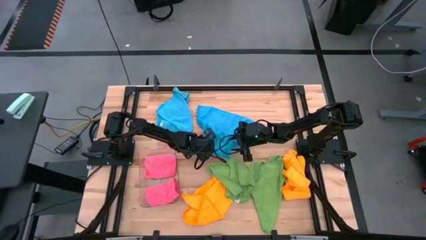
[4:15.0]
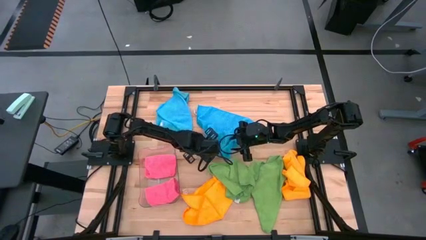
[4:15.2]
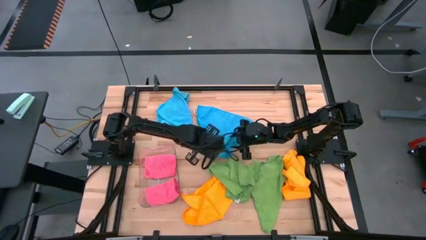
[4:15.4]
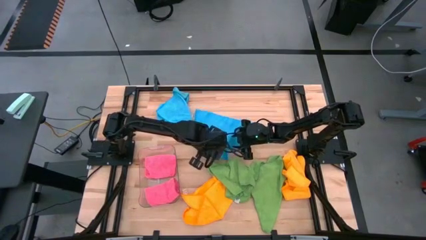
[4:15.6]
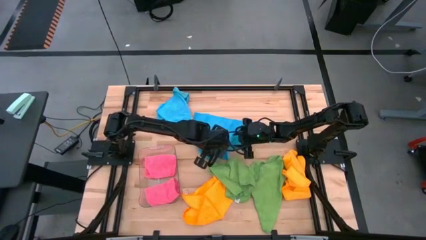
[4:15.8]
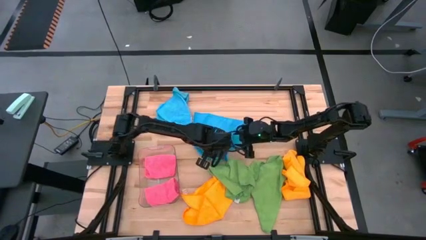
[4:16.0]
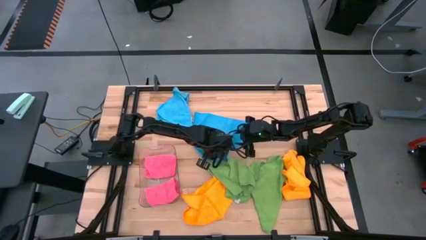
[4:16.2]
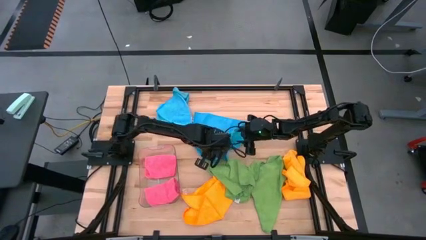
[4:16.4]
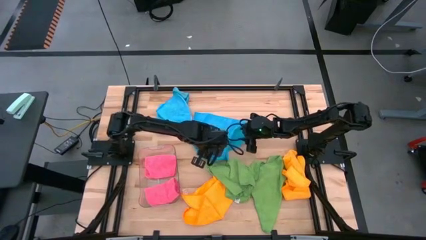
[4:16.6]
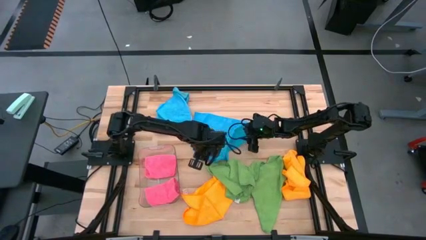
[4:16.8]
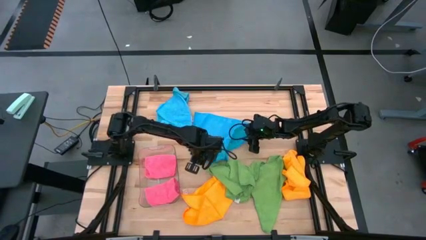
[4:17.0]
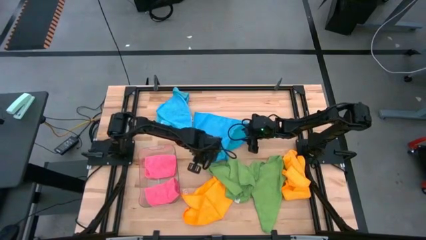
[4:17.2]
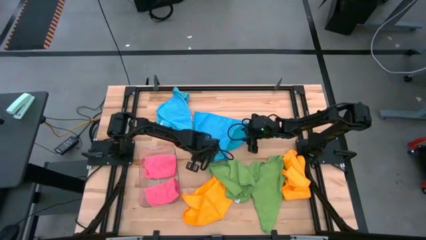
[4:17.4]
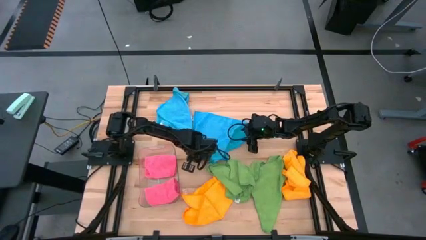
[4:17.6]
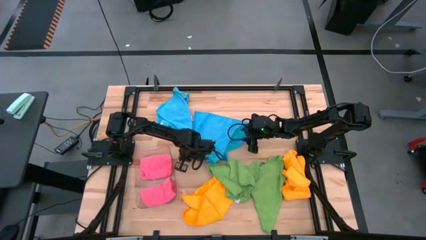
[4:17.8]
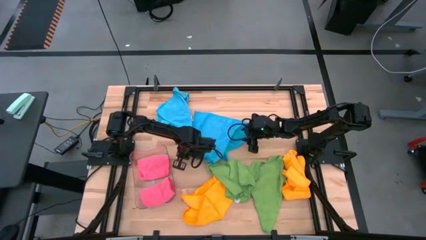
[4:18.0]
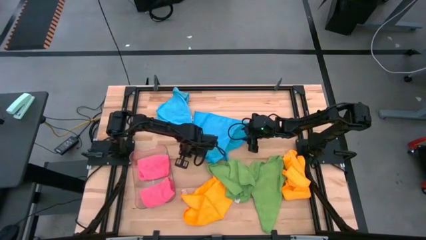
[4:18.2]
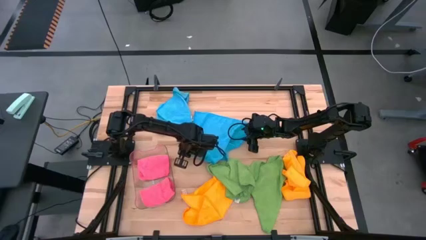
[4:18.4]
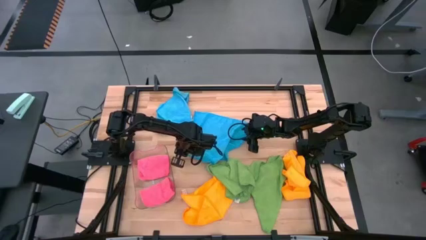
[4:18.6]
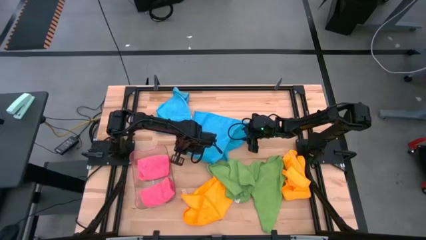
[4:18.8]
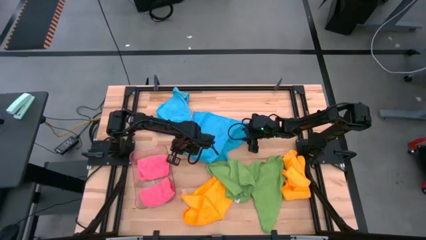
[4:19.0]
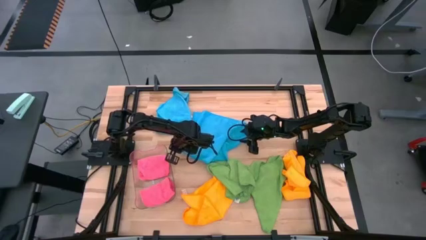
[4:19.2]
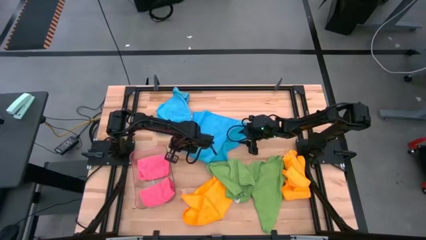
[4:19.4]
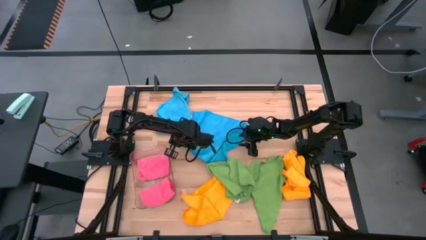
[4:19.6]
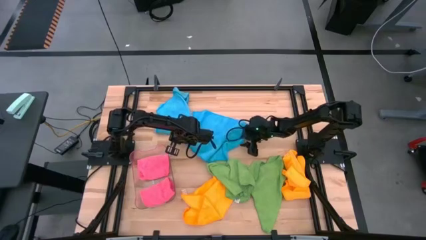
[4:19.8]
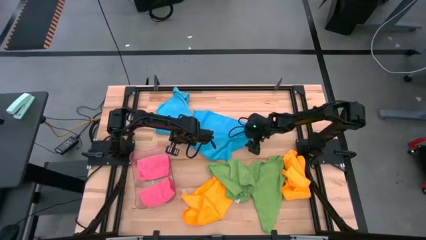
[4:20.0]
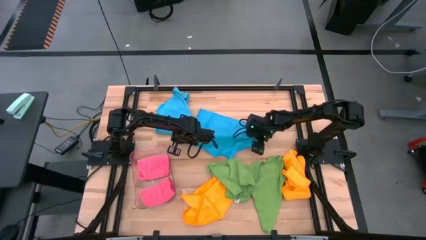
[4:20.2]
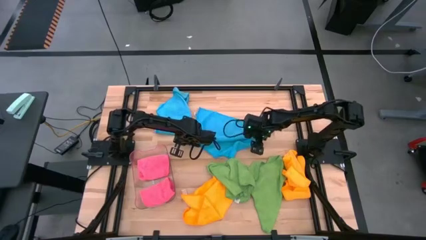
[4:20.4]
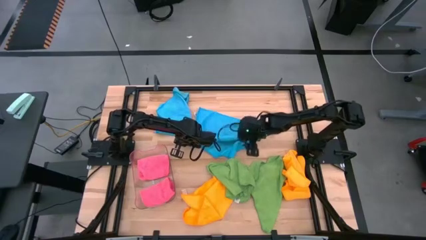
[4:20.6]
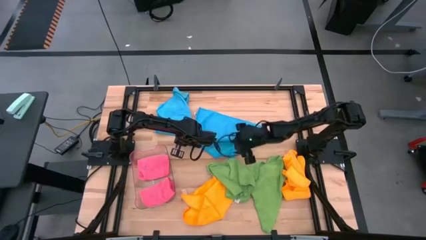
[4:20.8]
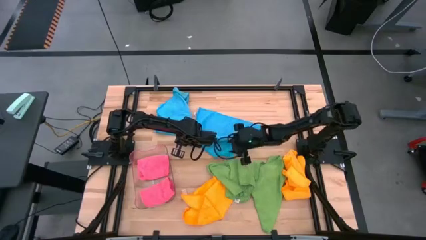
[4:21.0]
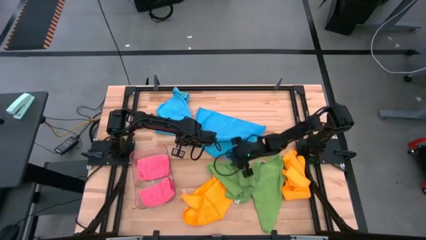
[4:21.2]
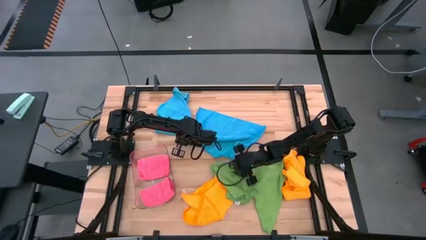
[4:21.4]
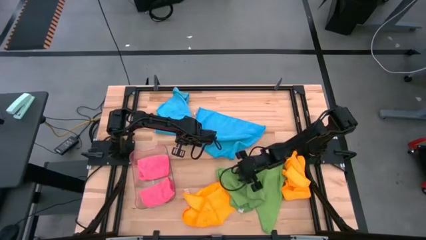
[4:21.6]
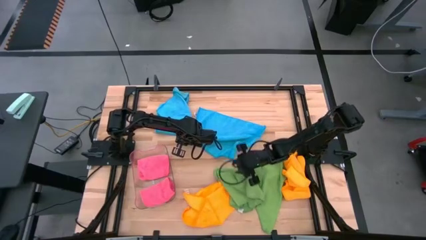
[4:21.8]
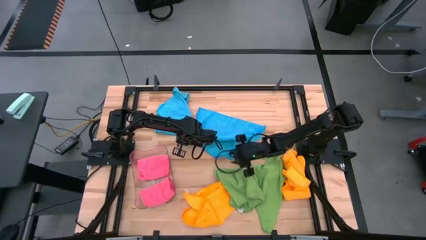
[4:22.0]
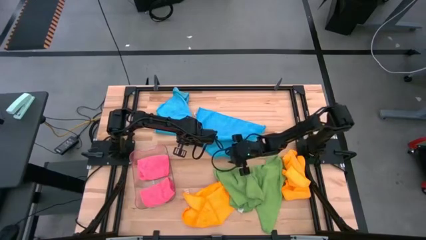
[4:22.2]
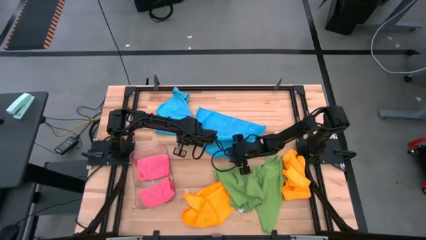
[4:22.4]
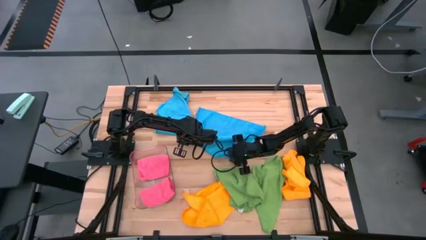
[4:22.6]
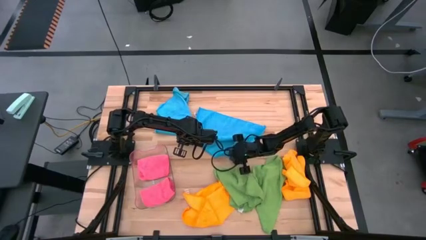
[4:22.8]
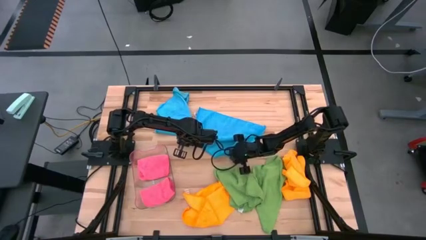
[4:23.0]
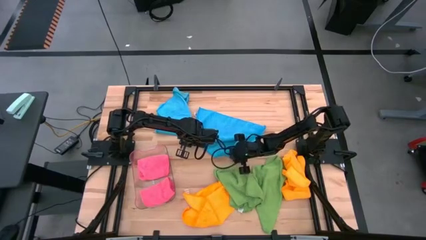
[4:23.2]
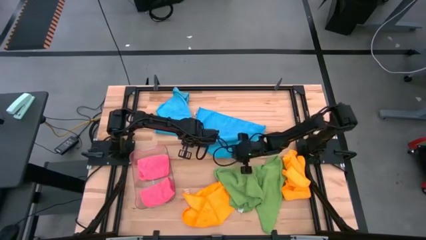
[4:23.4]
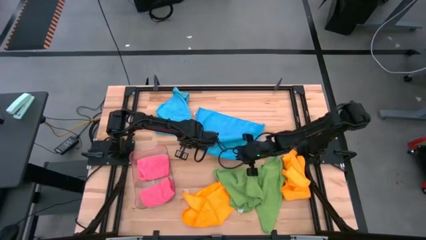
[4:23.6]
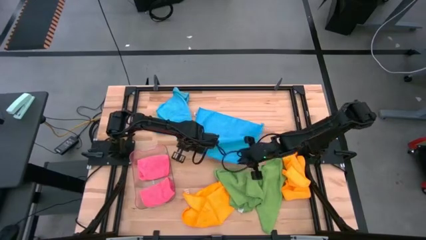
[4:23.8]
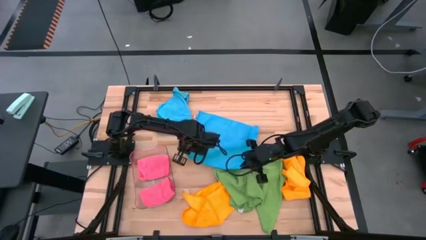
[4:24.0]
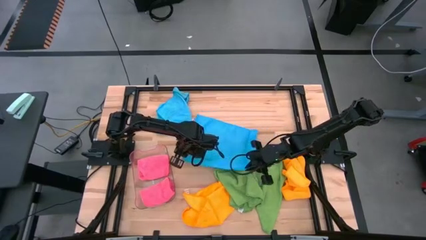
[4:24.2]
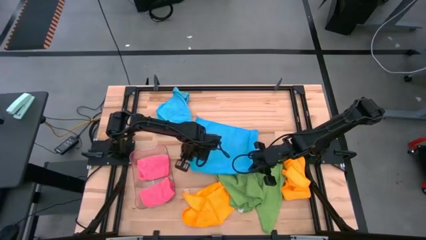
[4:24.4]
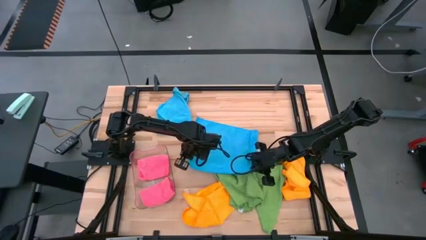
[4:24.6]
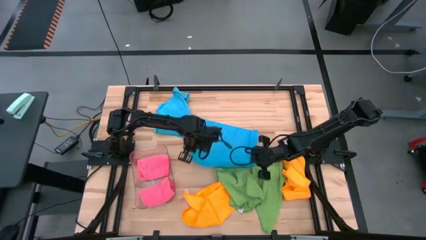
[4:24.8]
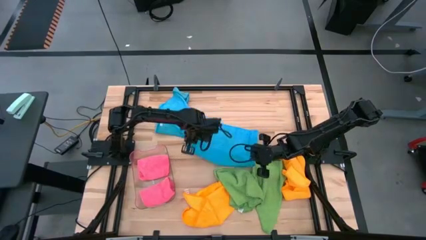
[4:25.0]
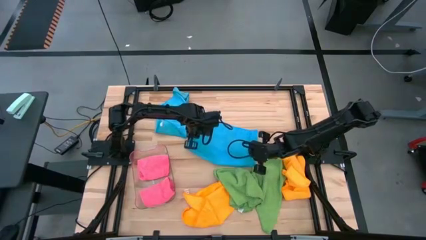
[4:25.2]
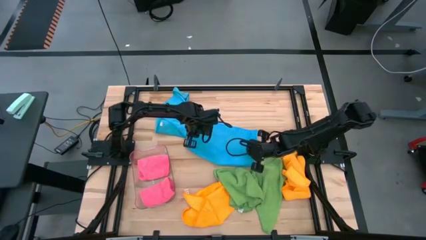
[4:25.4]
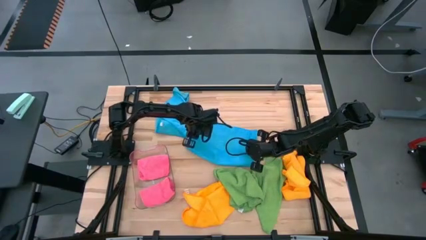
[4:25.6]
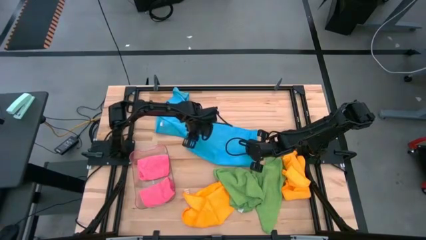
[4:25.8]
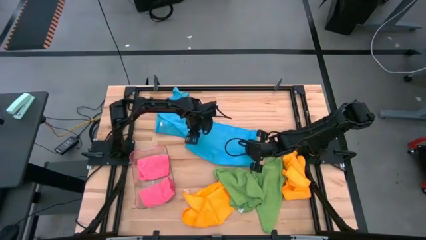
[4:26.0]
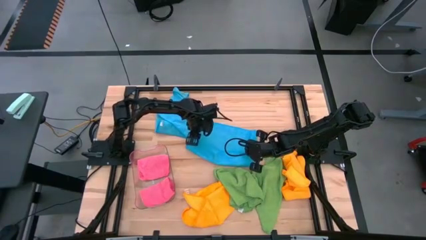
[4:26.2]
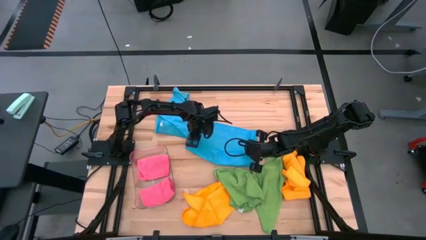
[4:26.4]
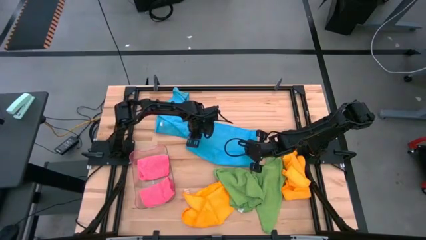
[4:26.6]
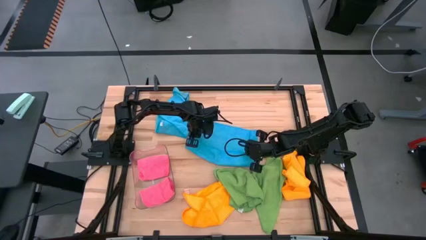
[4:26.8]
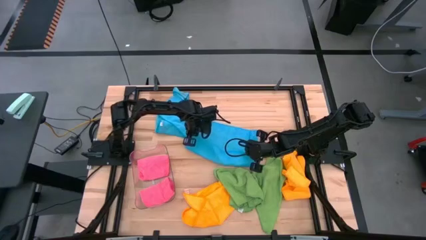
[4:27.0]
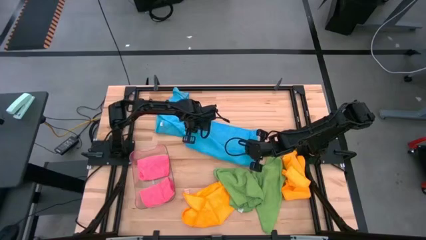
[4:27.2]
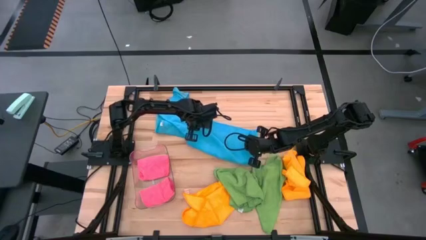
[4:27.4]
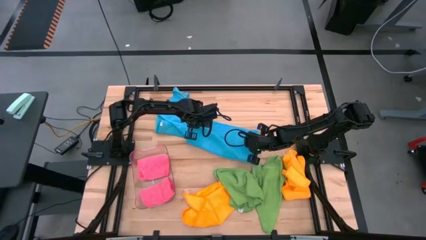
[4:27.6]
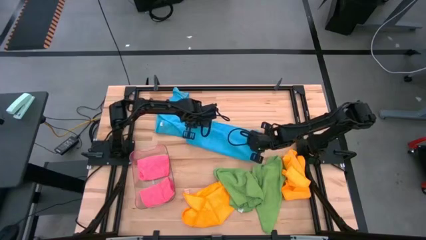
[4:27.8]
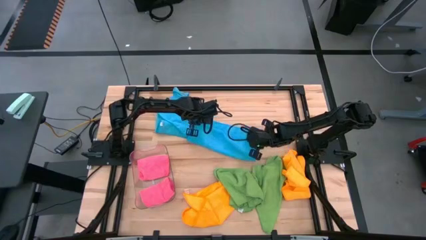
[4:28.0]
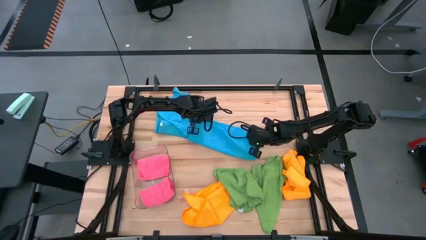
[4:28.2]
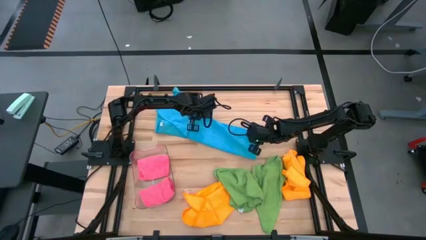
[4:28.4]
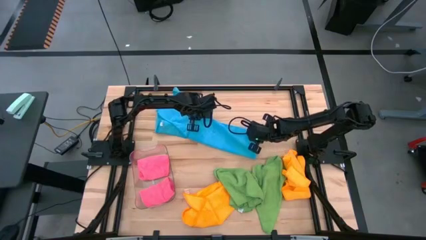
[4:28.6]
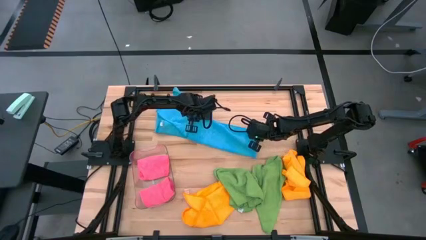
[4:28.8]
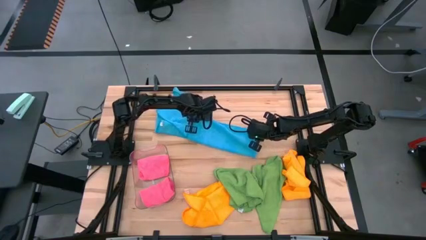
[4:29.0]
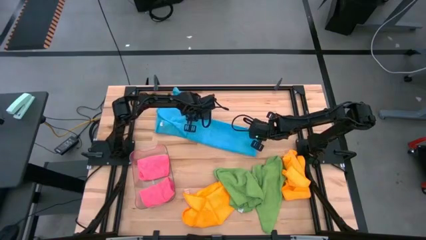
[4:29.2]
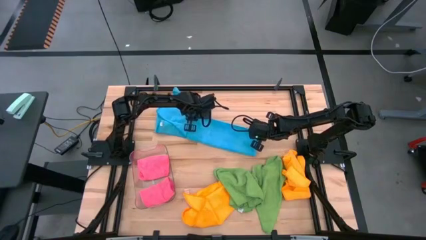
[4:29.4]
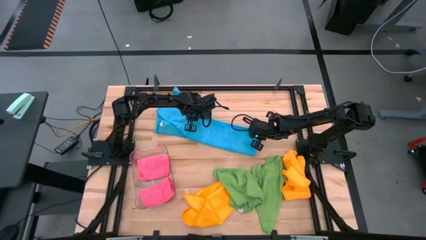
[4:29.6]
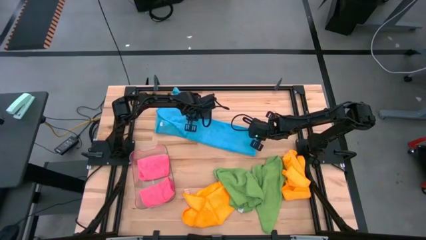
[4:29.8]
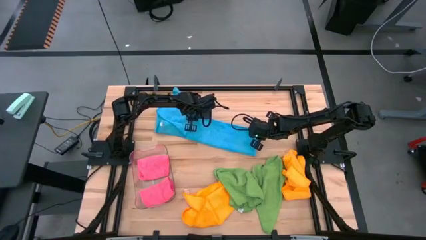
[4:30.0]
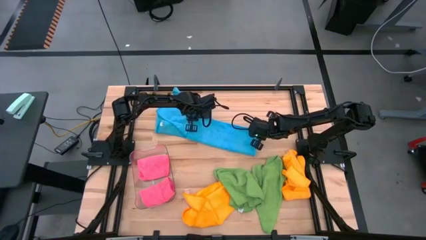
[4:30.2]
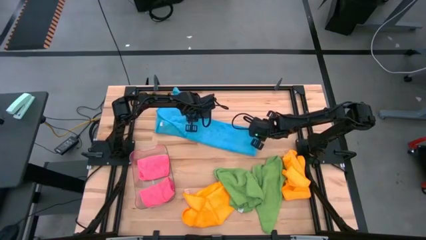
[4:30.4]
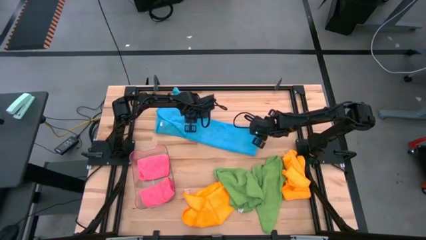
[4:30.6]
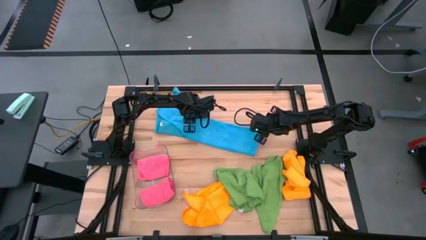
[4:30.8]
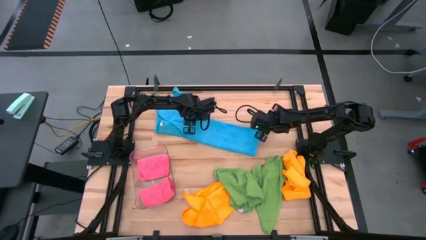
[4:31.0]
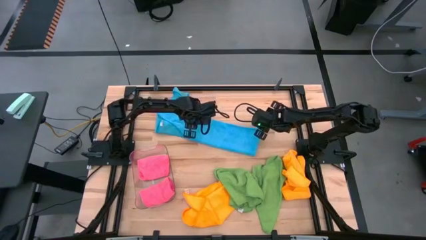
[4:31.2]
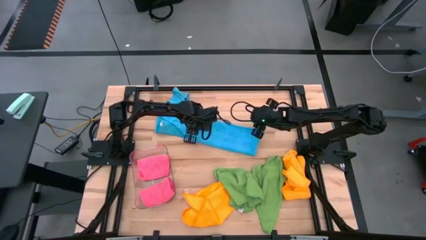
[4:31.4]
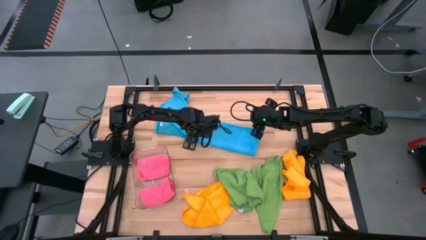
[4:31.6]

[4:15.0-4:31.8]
Task: Fold microfiber towels
Fold the bottom blue microfiber cloth
